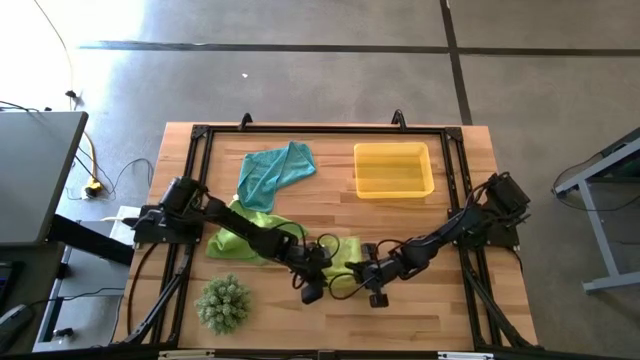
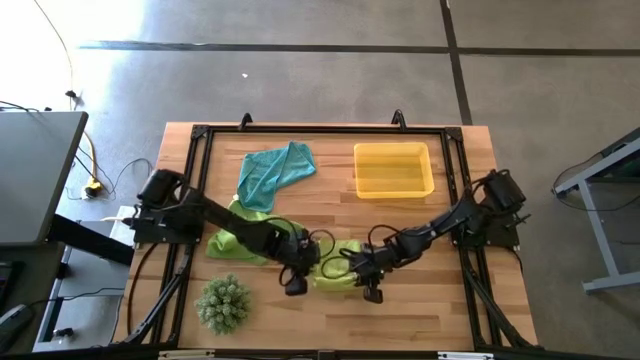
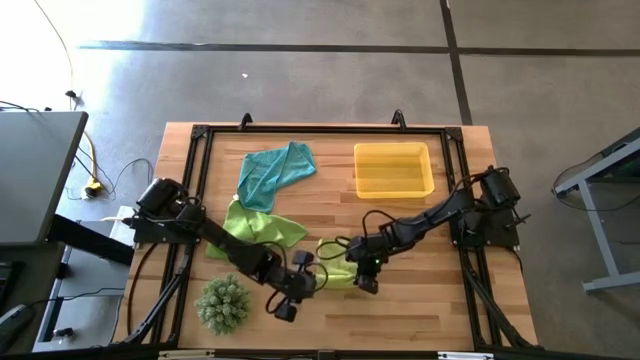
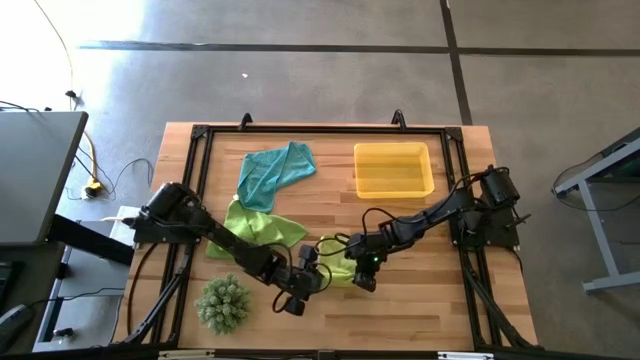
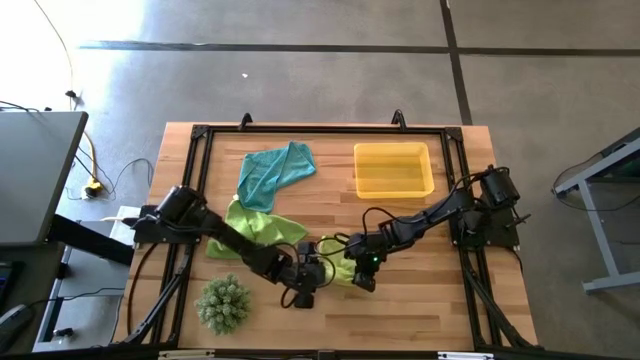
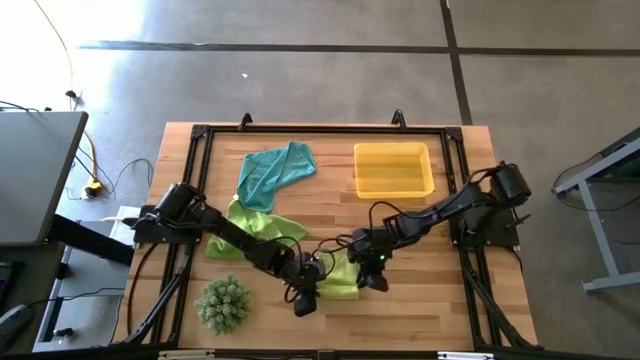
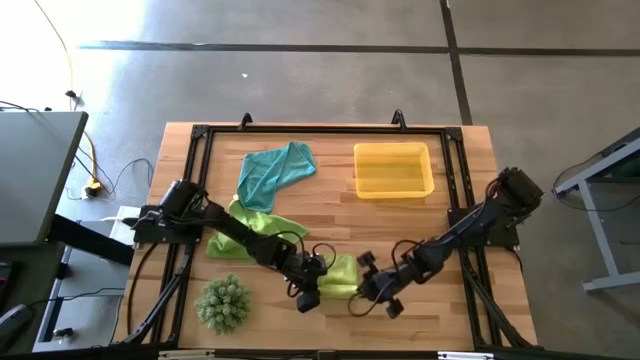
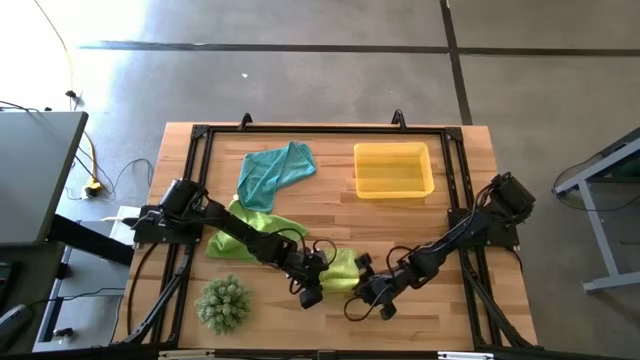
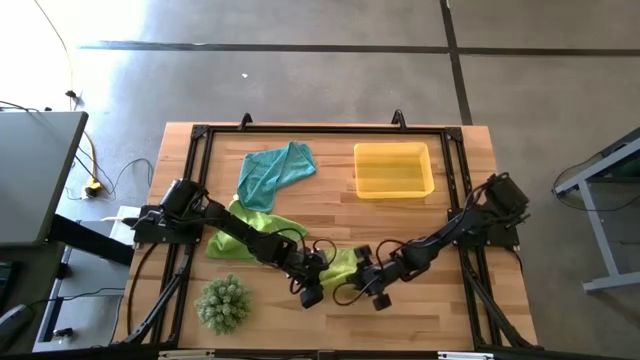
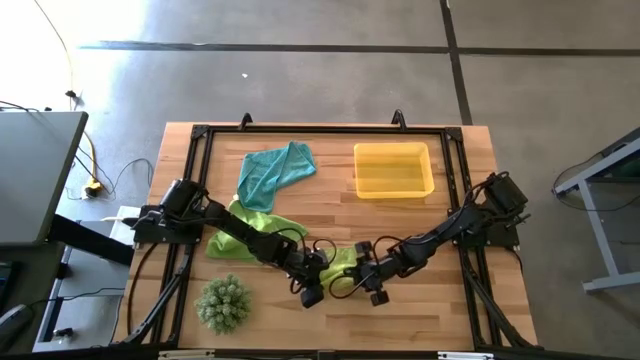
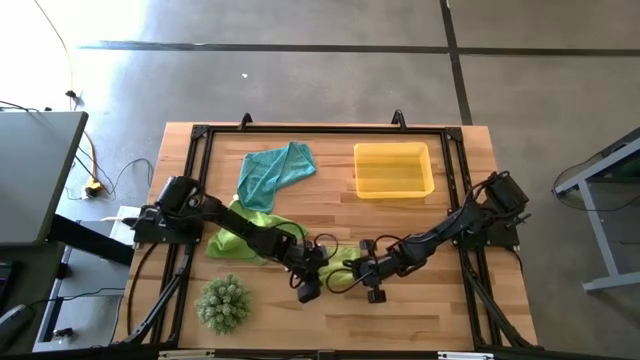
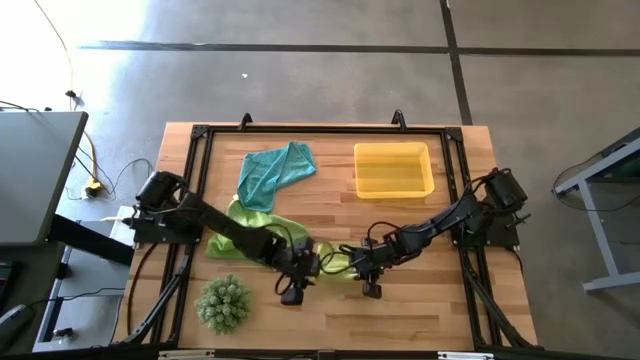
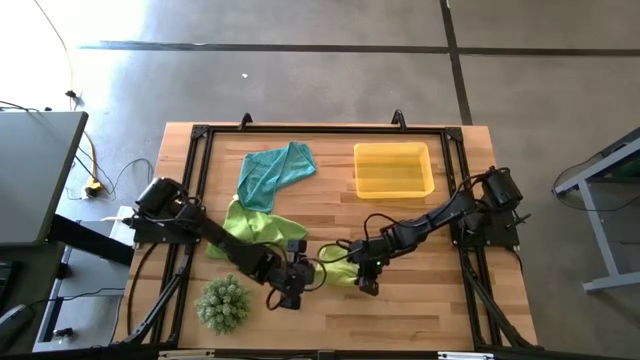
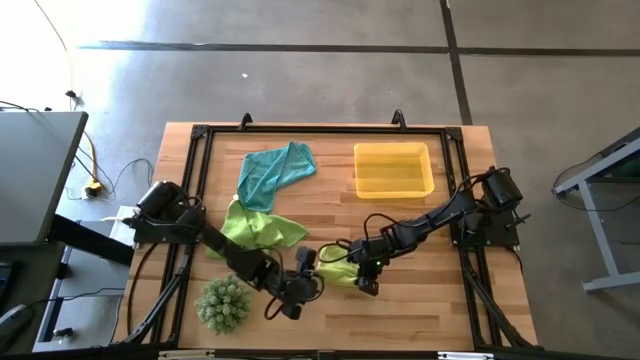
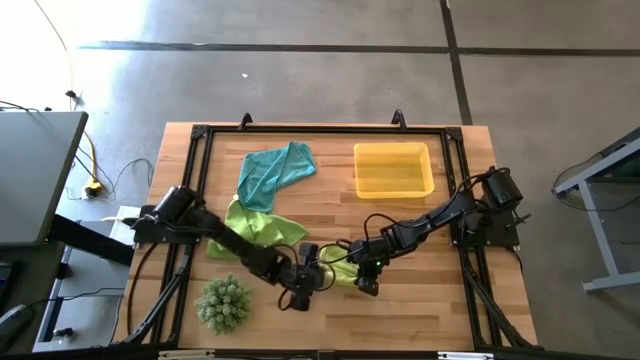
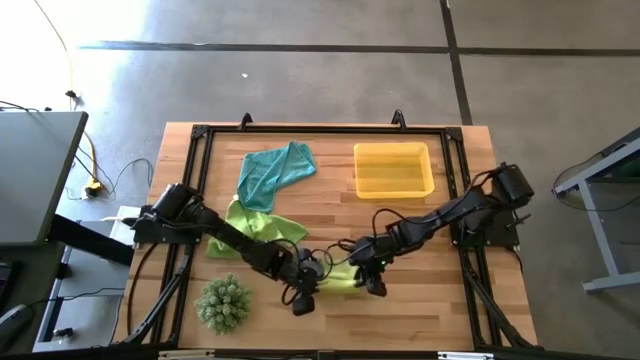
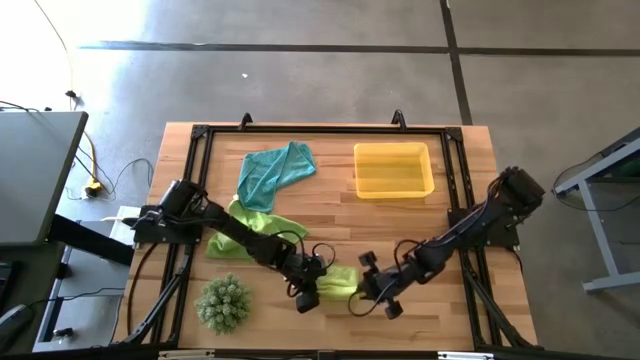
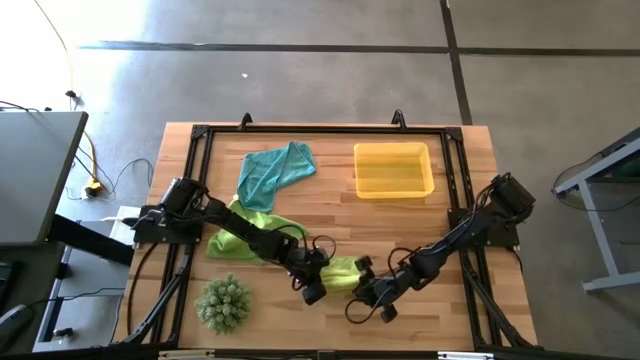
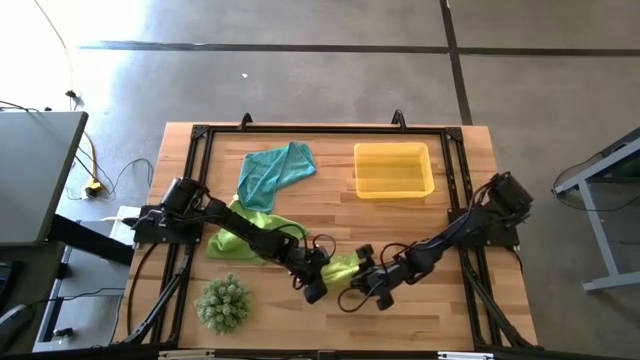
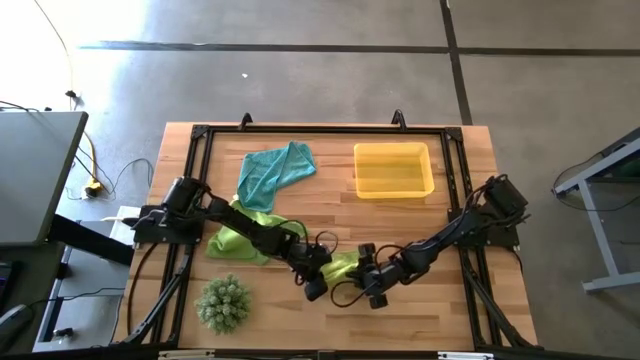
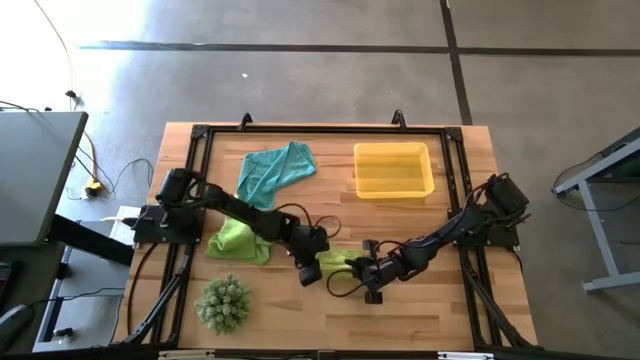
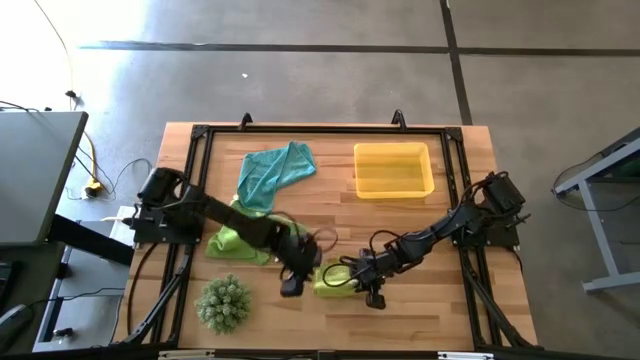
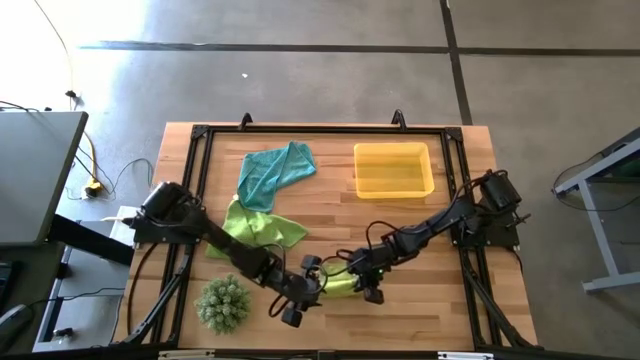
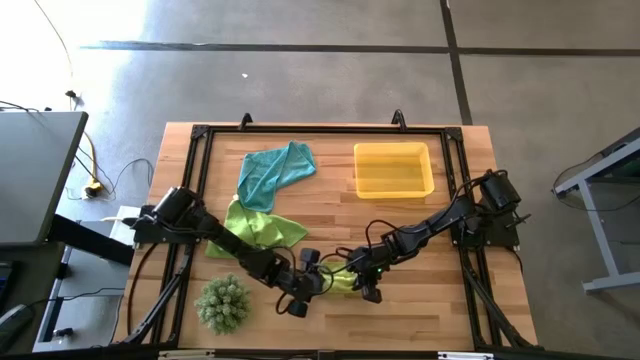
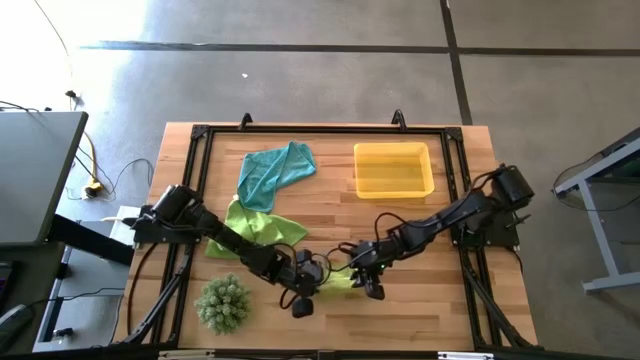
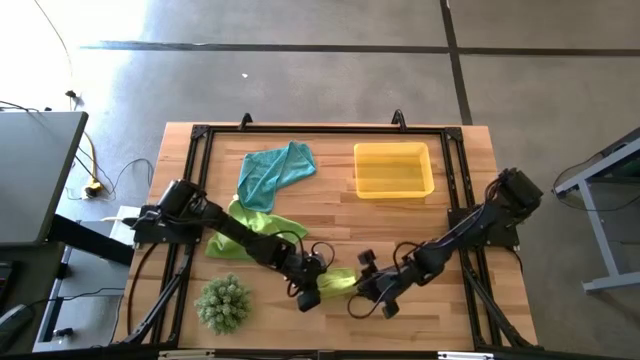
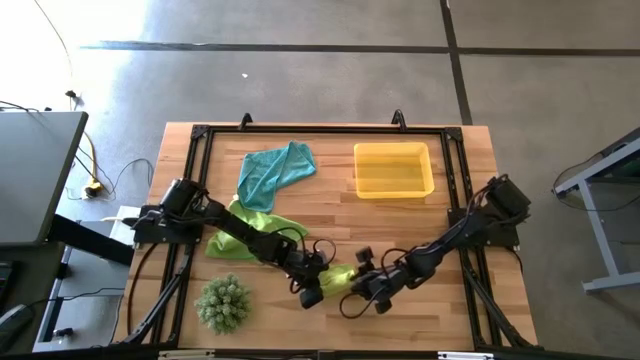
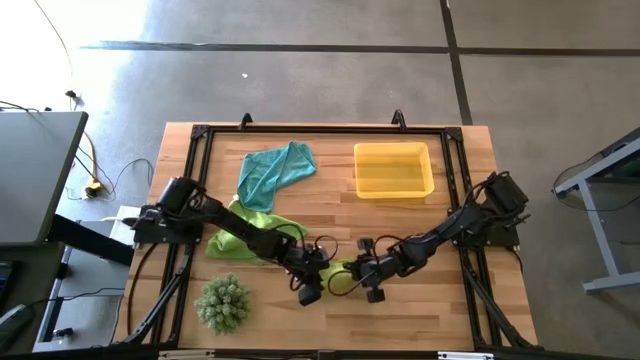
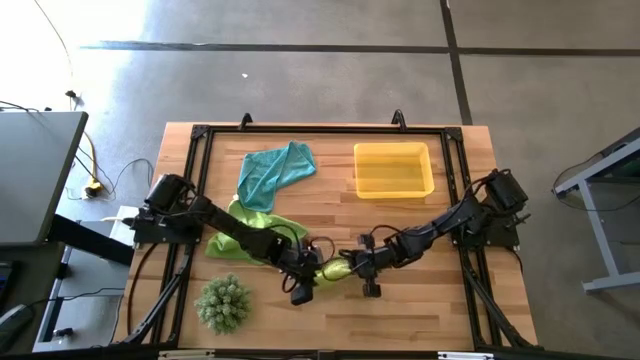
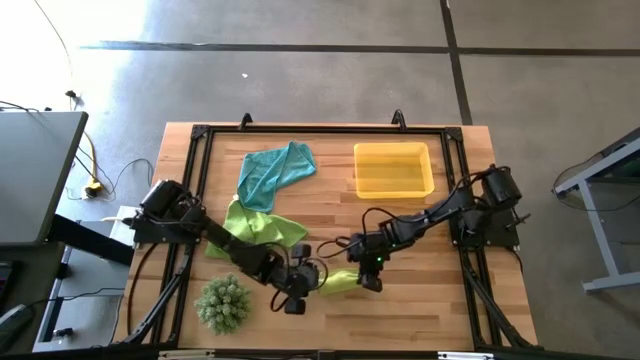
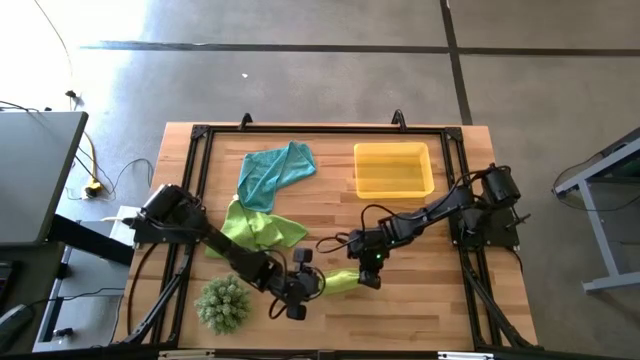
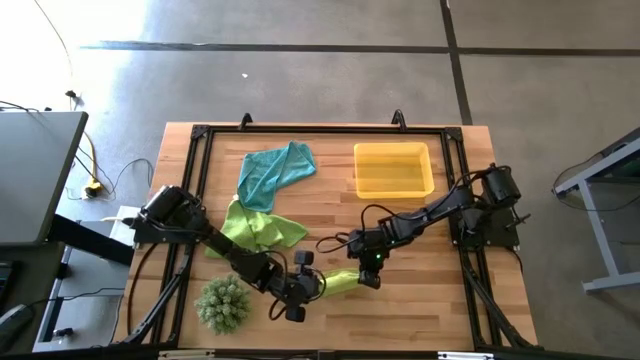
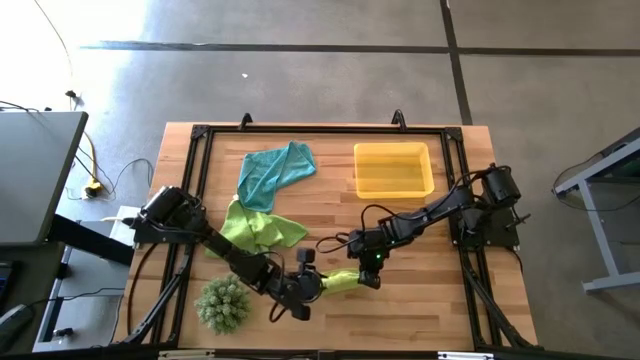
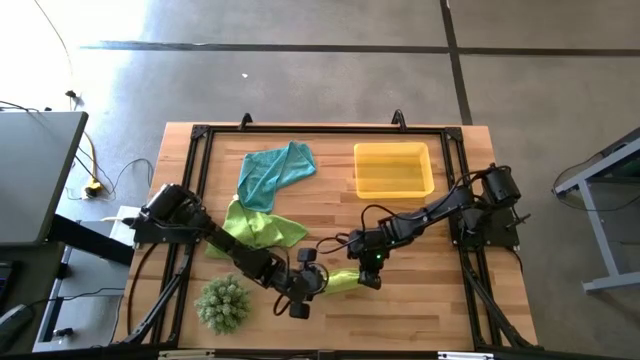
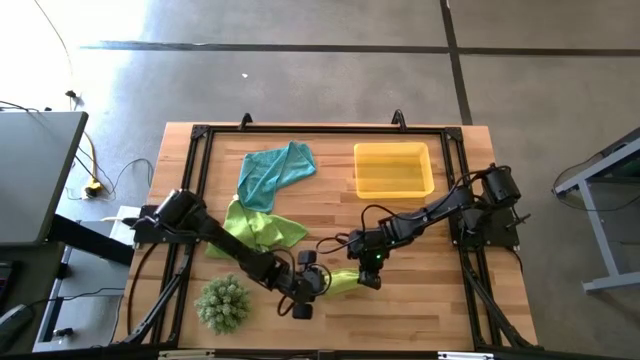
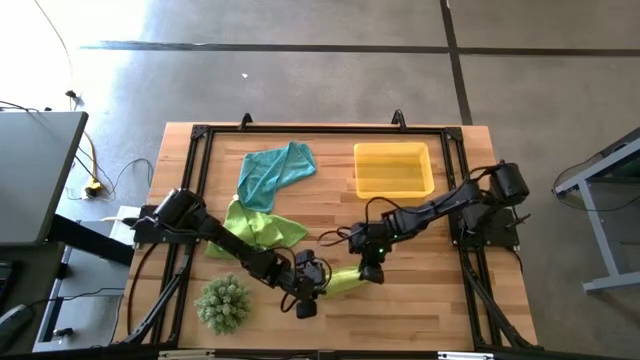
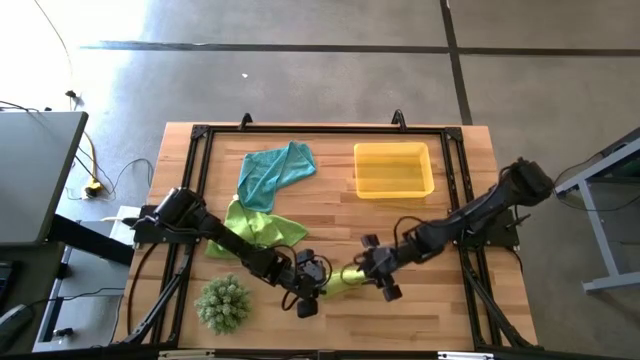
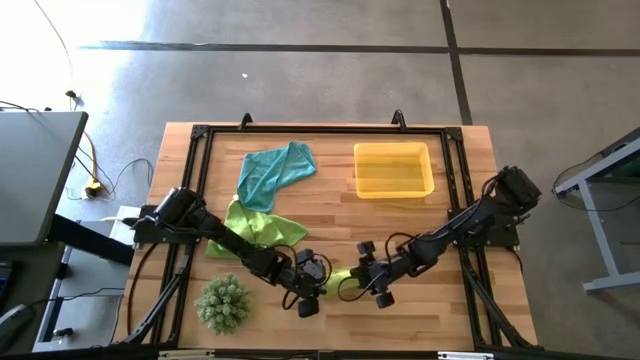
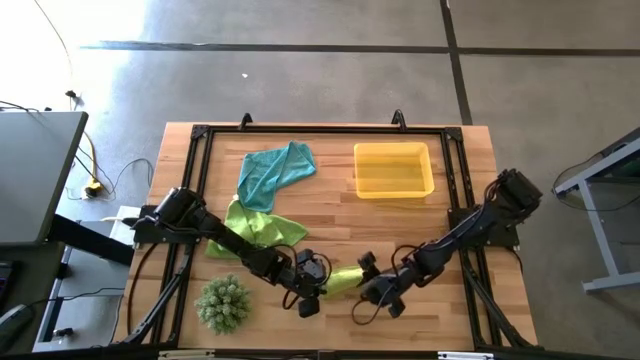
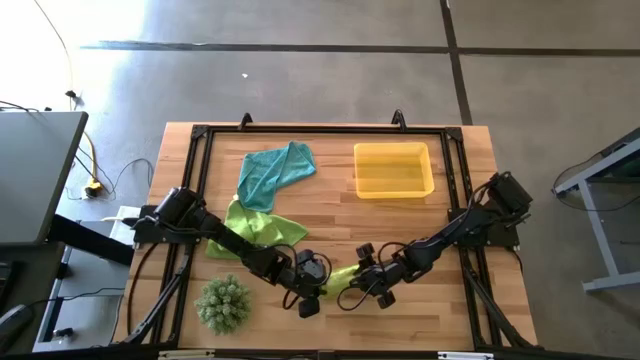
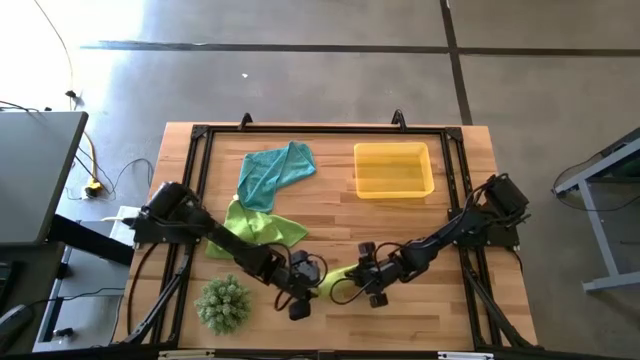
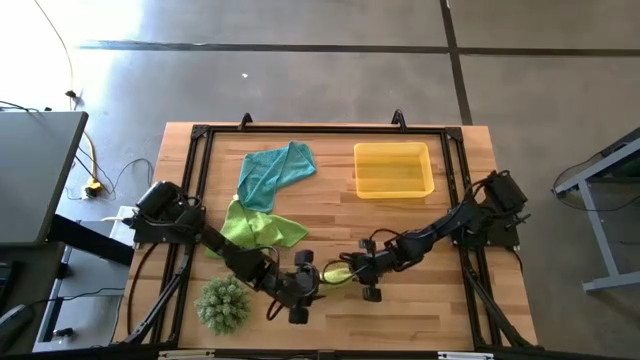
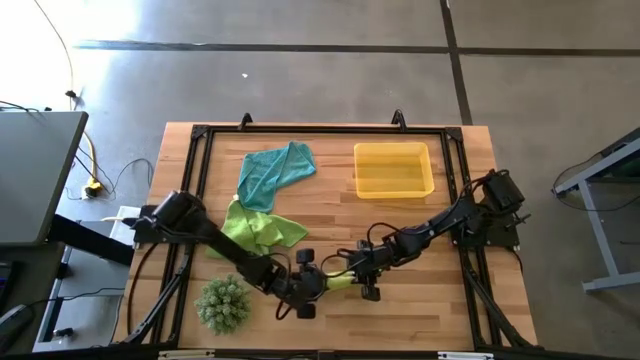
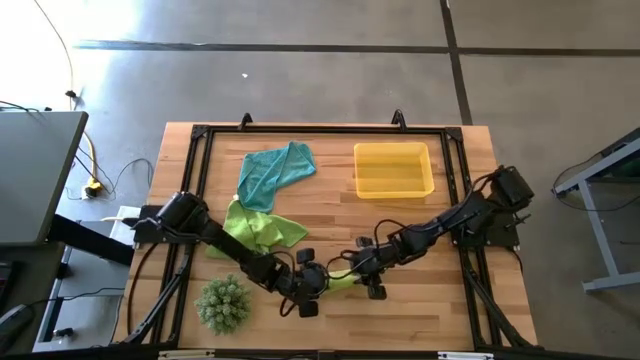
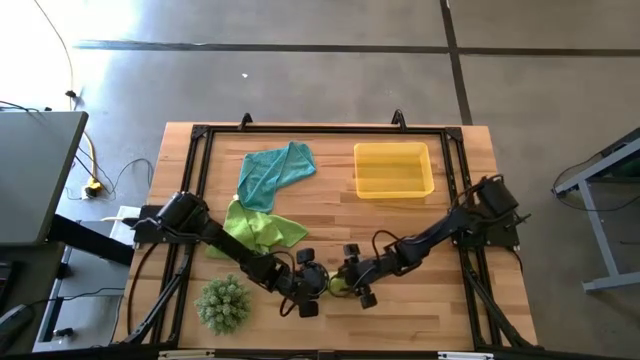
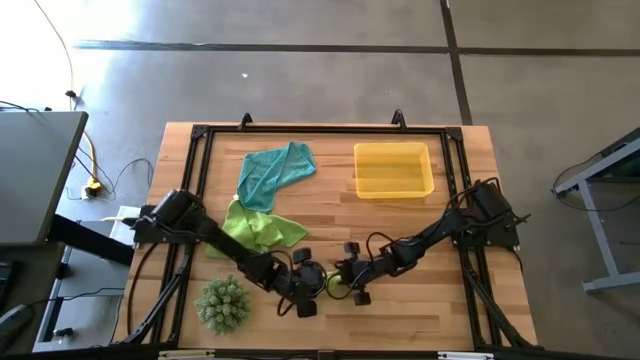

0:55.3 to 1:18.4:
Task: Roll microfiber towels into tight, uniform cylinder then place into a basket
Roll the light green towel
